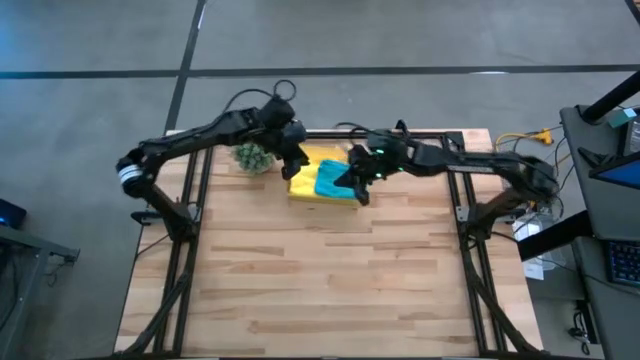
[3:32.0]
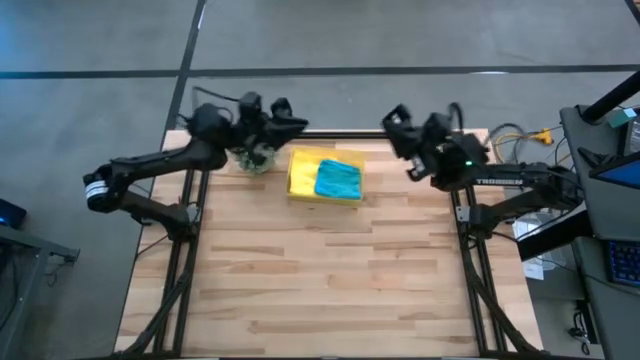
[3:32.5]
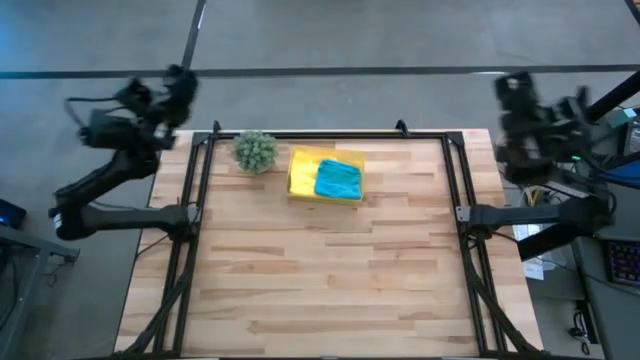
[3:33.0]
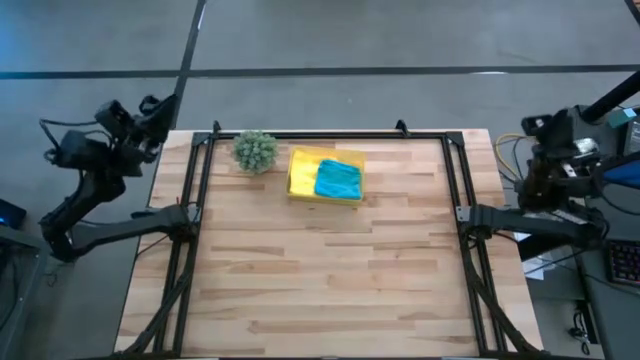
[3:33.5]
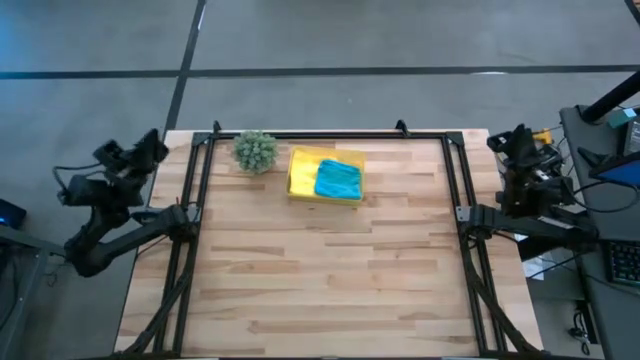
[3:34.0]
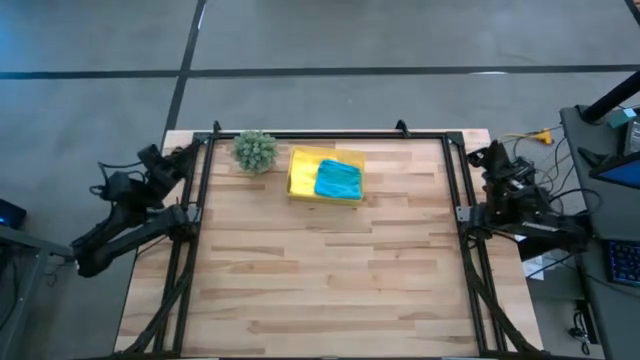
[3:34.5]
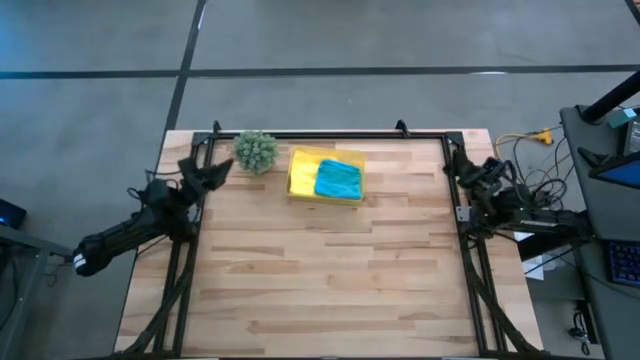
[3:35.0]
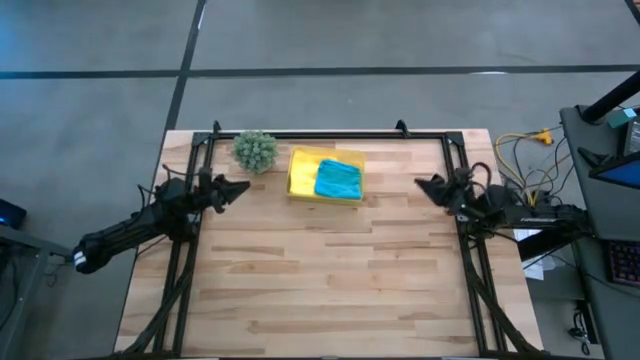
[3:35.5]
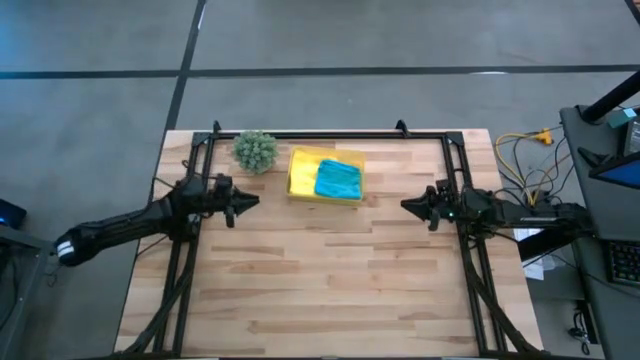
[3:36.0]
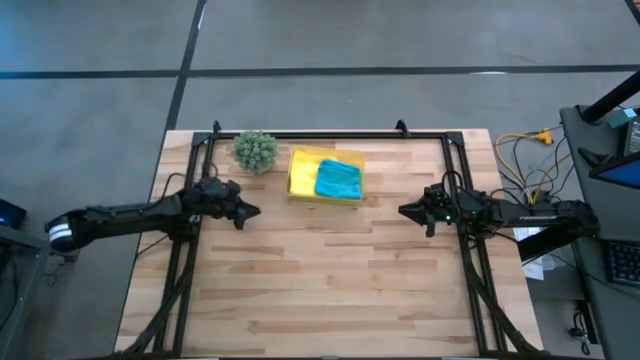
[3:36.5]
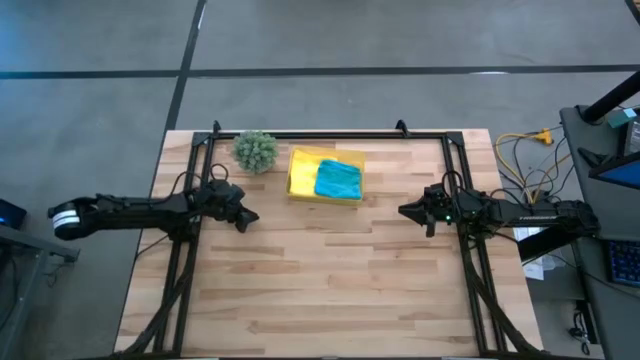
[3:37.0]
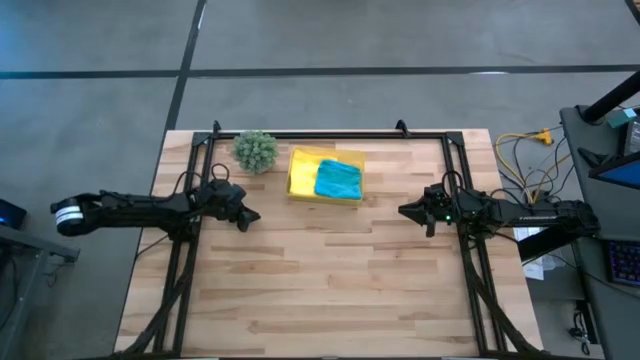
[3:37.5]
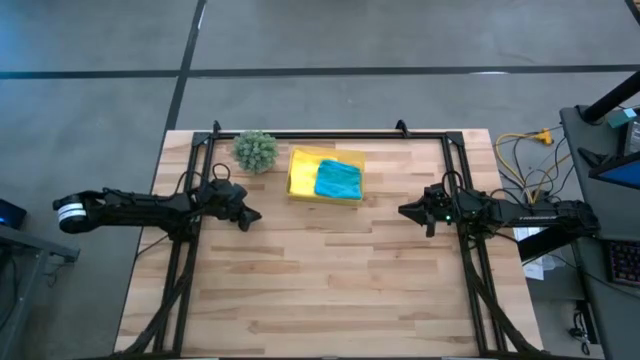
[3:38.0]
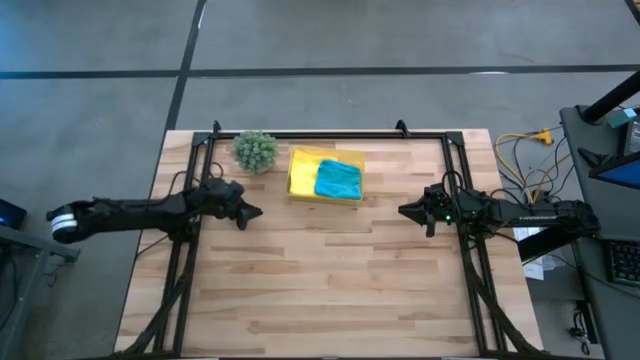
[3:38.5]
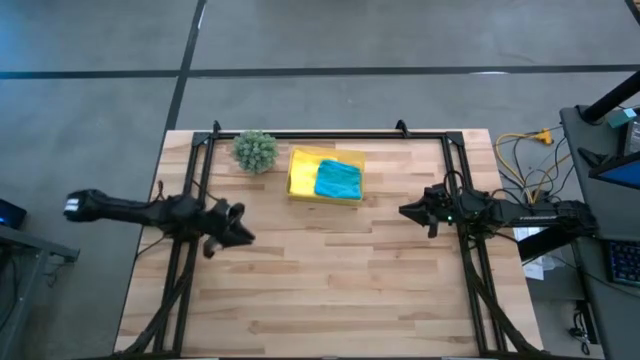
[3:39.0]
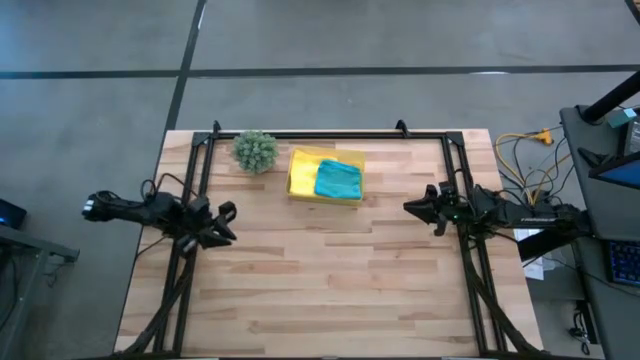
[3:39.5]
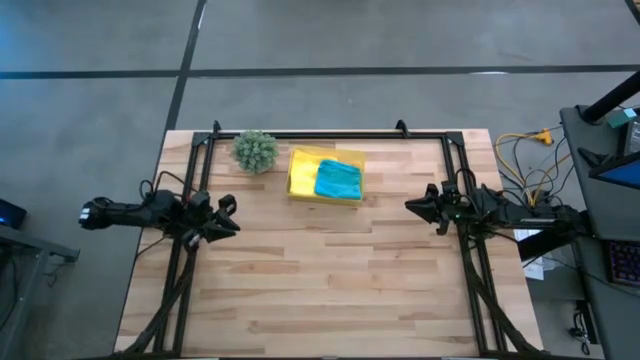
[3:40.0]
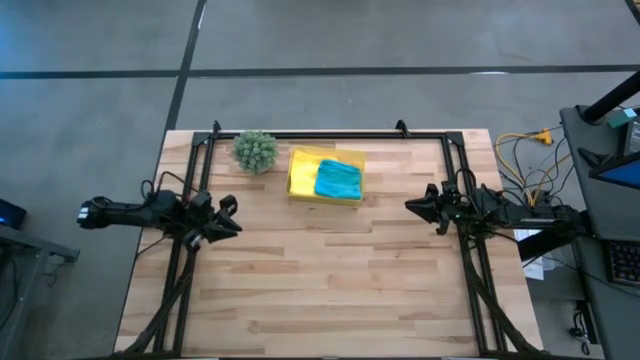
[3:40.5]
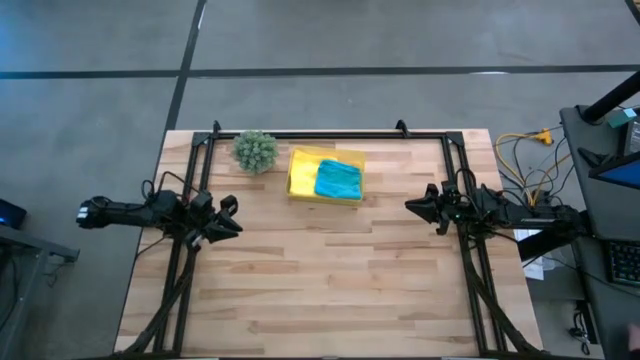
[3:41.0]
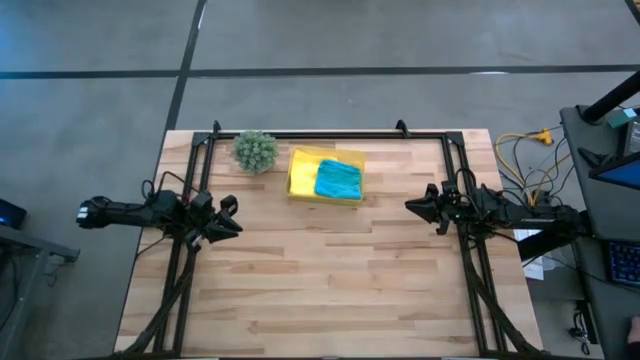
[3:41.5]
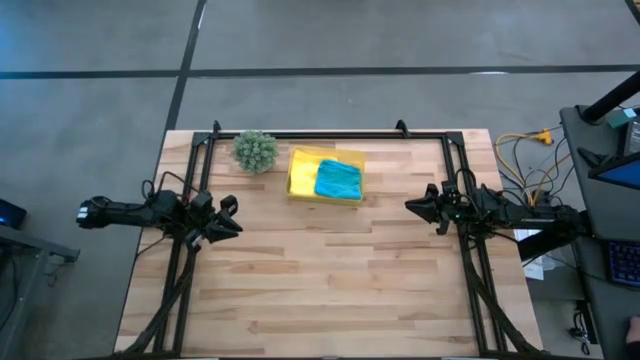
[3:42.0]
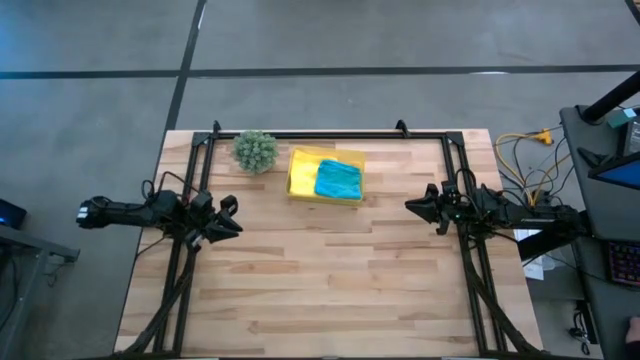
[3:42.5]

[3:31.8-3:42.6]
Task: Fold microfiber towels
Return to Home Position

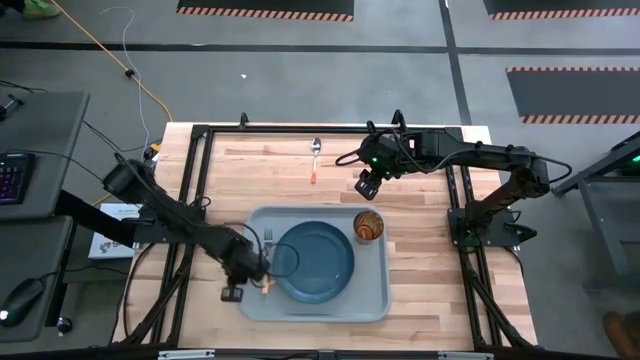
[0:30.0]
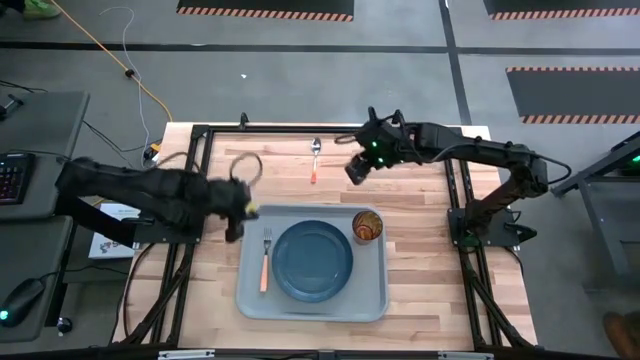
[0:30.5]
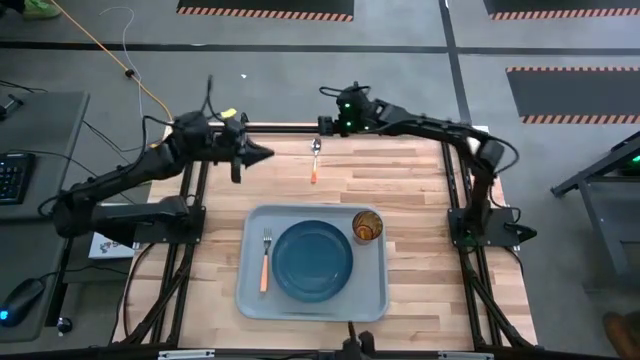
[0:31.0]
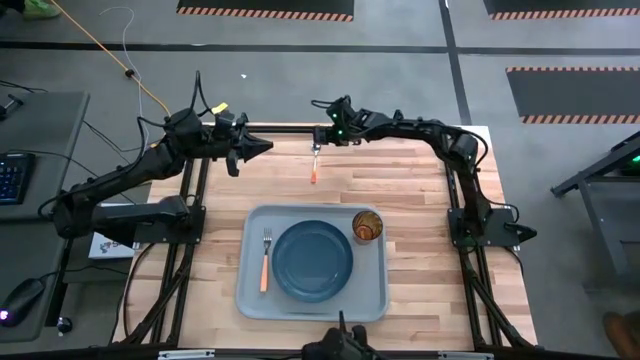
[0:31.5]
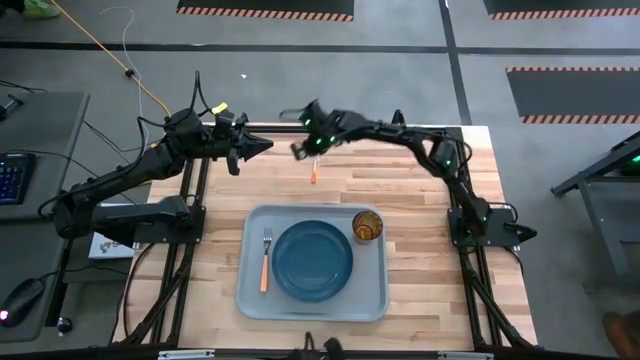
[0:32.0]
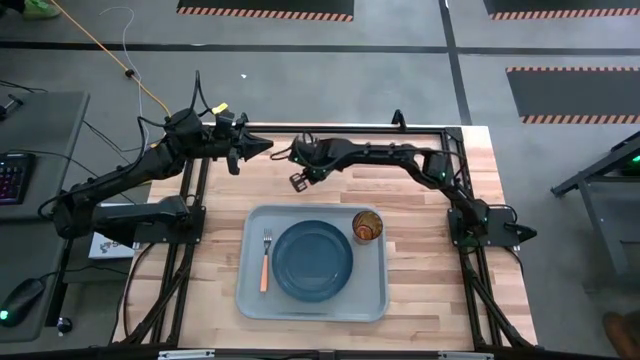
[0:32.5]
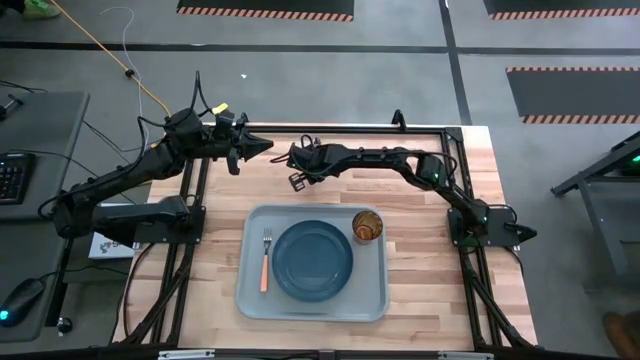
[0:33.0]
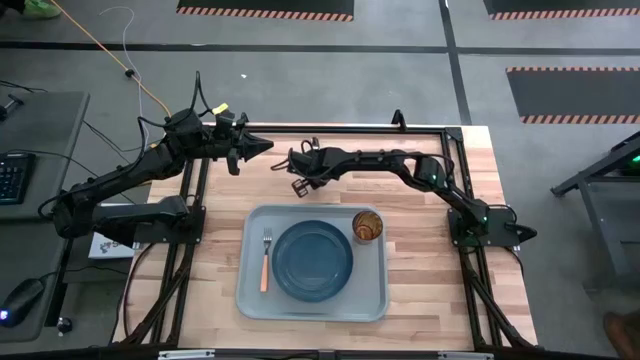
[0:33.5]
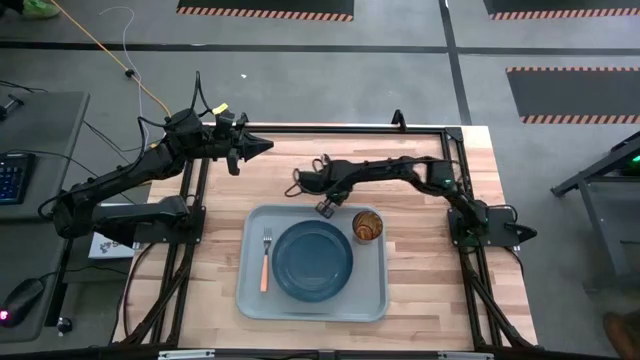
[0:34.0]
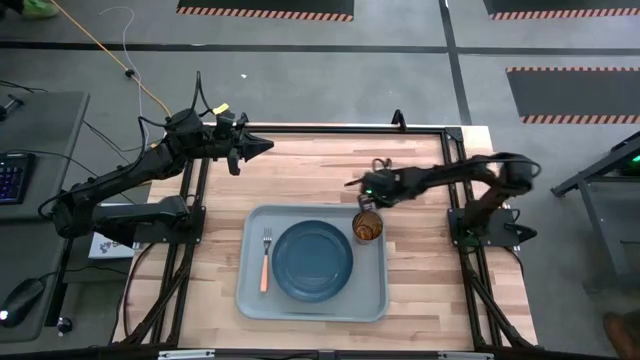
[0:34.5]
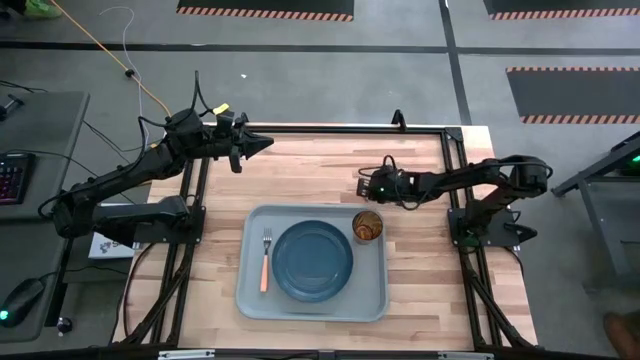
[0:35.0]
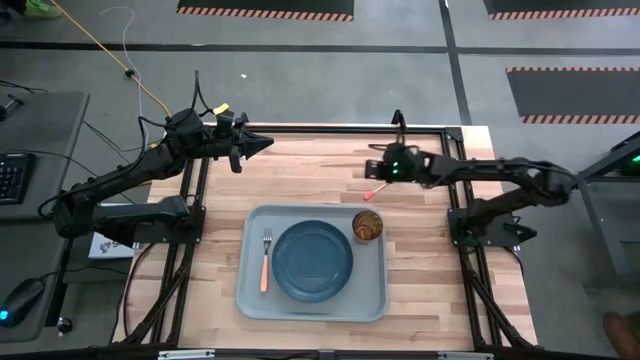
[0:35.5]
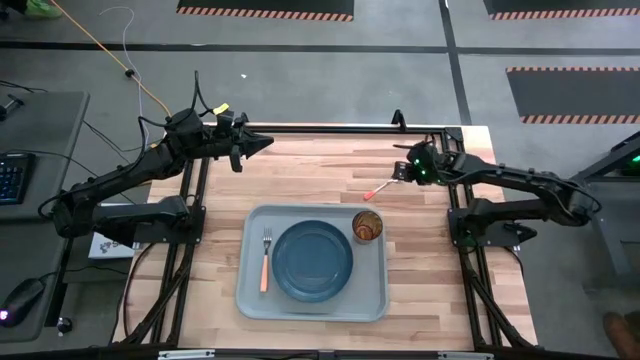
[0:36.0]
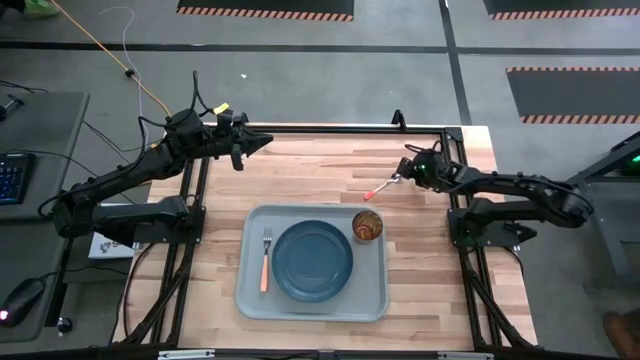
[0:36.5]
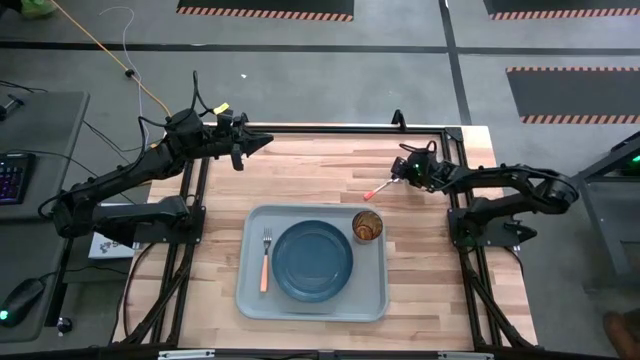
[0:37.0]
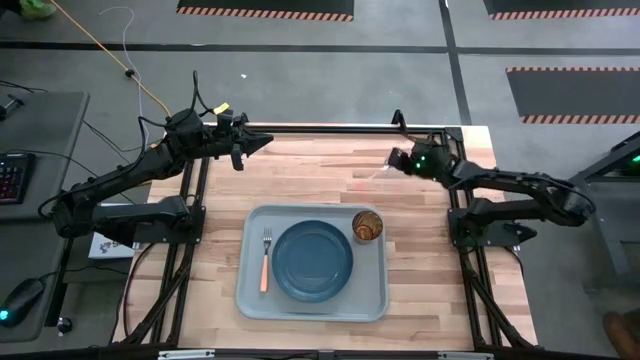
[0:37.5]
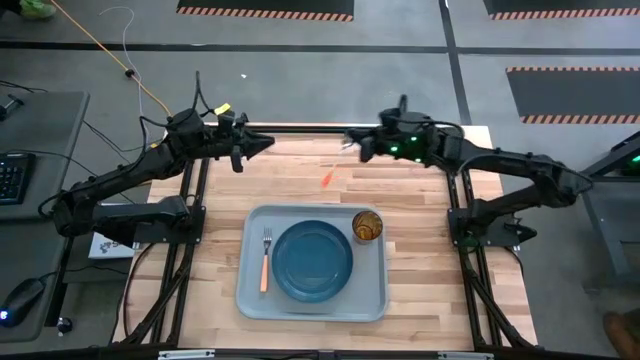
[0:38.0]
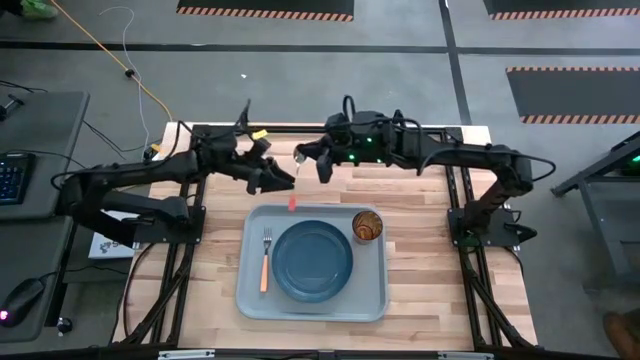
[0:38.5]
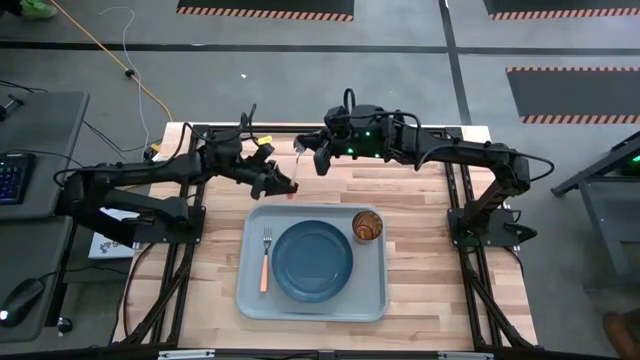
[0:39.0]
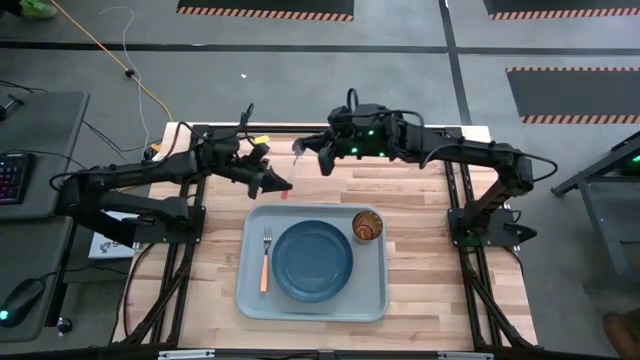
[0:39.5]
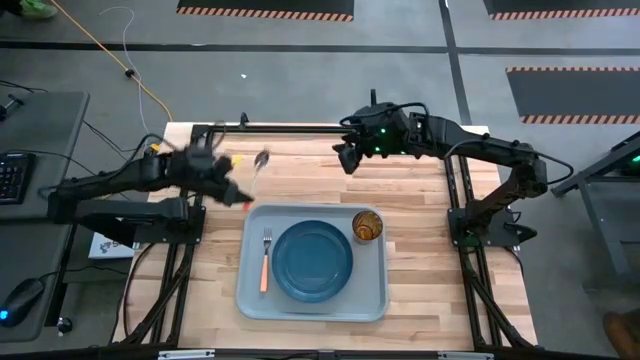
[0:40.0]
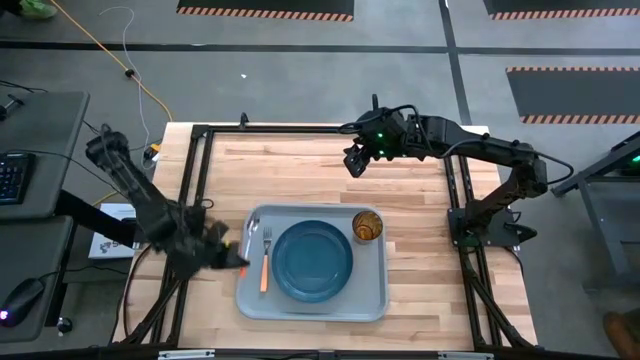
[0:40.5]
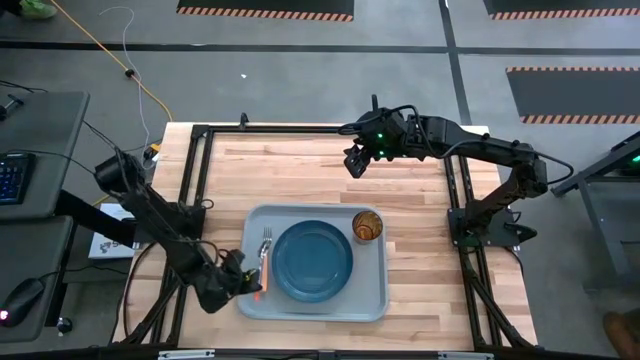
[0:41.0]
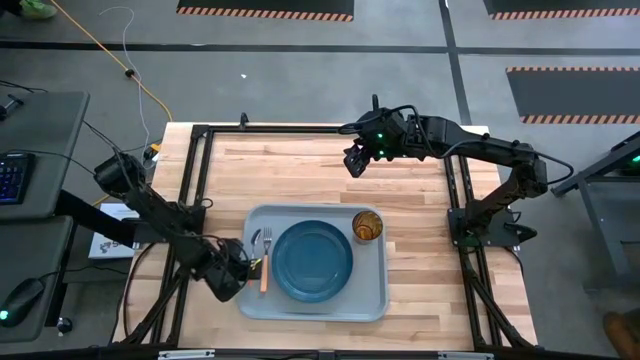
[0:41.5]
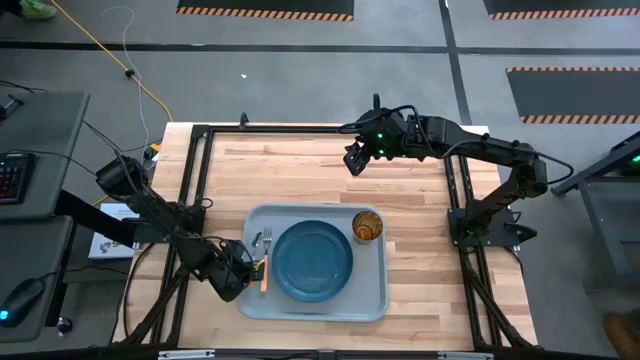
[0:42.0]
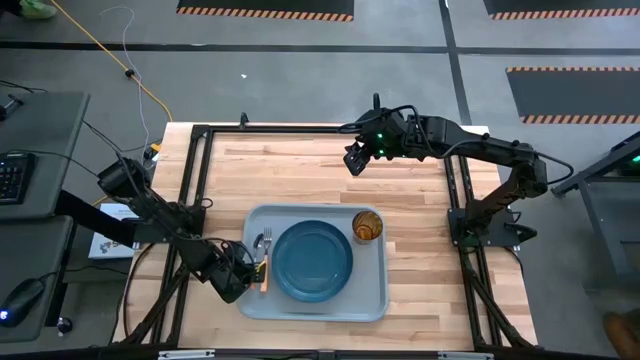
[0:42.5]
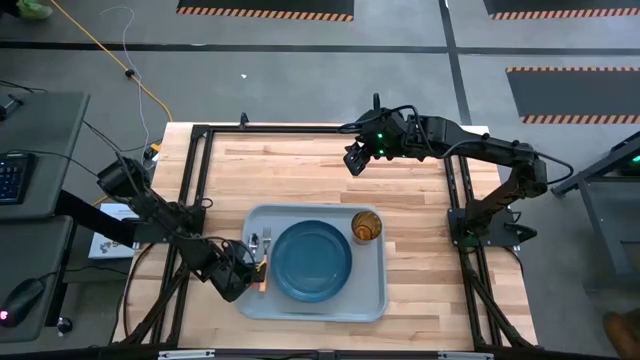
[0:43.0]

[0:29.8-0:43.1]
Task: Pick and place plate/cup/fork/spoon on tray
Put the orange on the gray serving tray to the left of the orange fork
